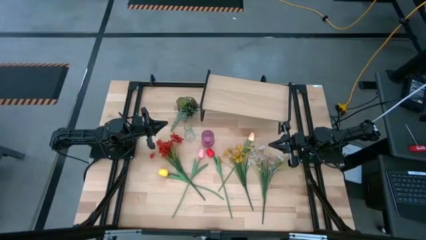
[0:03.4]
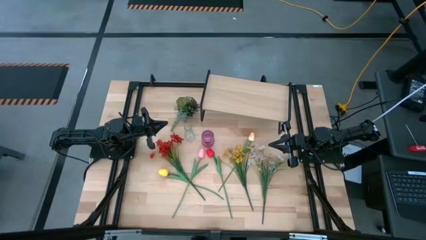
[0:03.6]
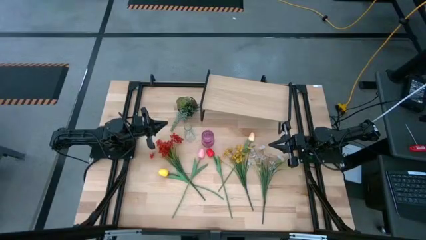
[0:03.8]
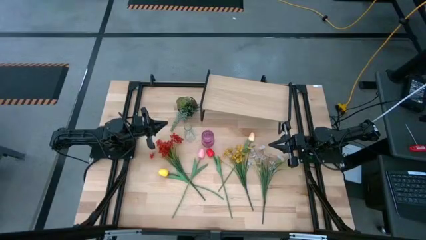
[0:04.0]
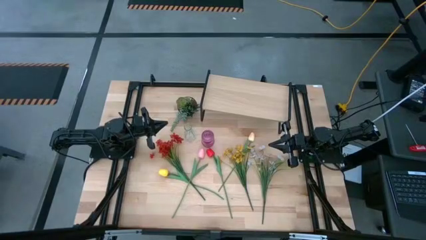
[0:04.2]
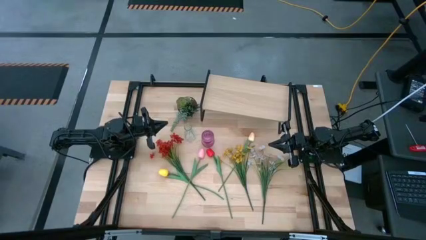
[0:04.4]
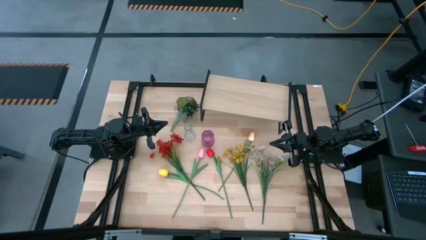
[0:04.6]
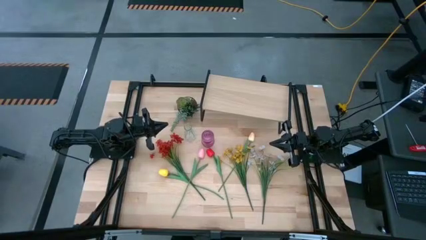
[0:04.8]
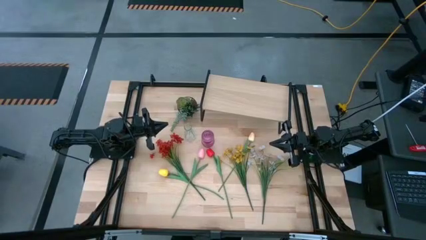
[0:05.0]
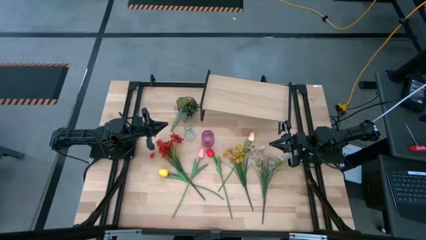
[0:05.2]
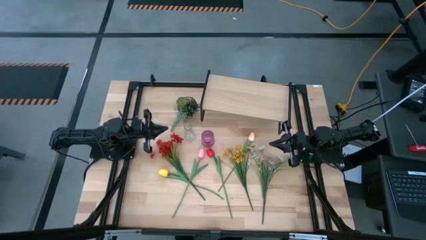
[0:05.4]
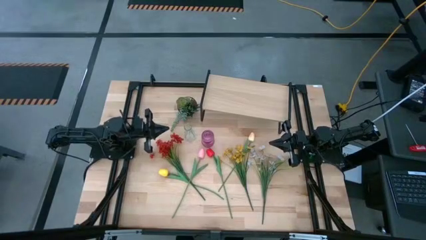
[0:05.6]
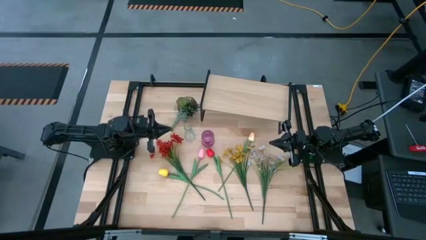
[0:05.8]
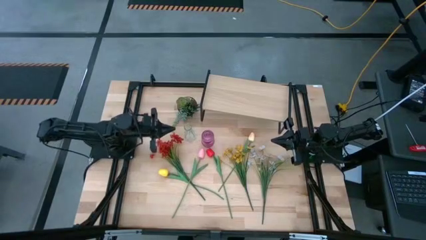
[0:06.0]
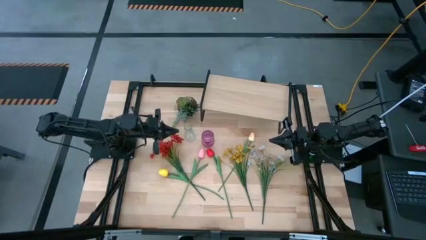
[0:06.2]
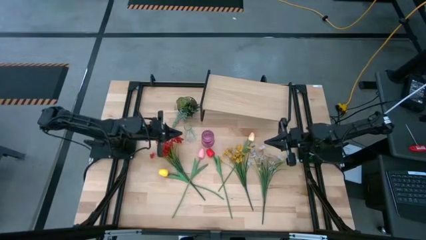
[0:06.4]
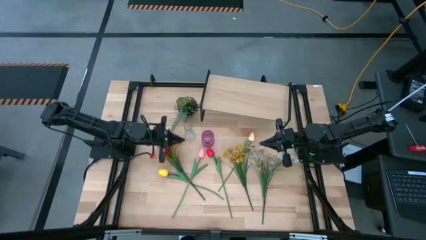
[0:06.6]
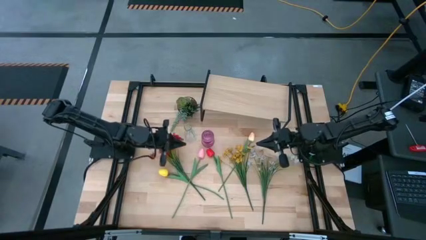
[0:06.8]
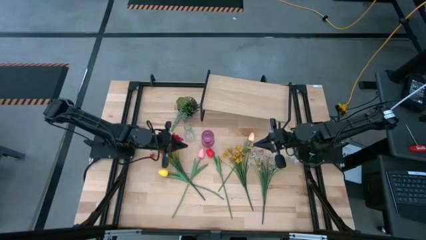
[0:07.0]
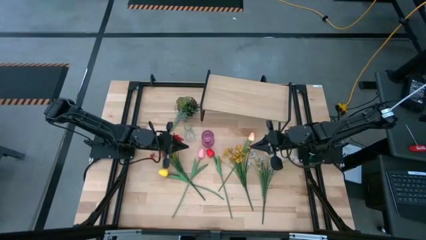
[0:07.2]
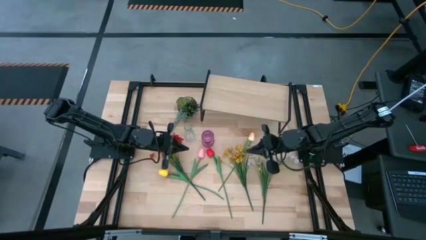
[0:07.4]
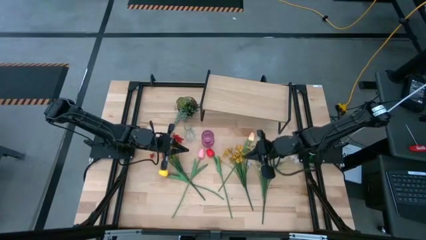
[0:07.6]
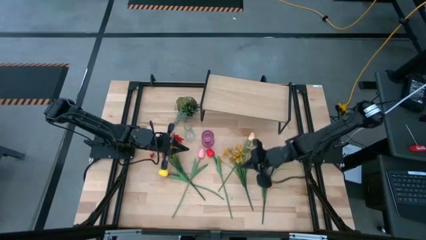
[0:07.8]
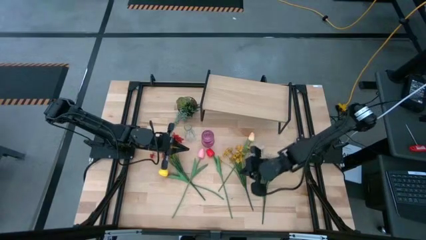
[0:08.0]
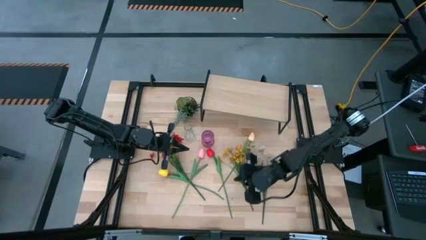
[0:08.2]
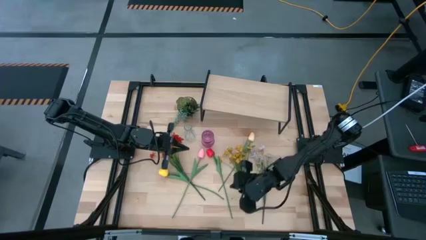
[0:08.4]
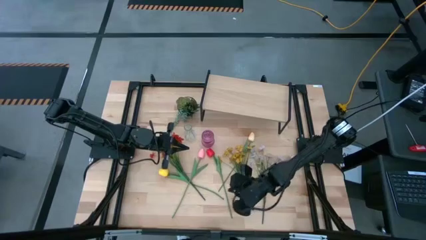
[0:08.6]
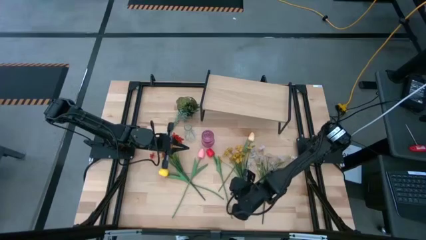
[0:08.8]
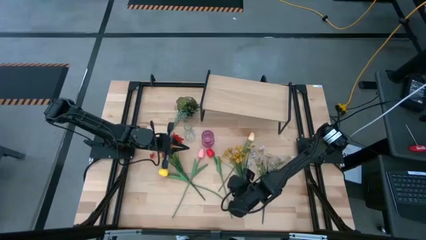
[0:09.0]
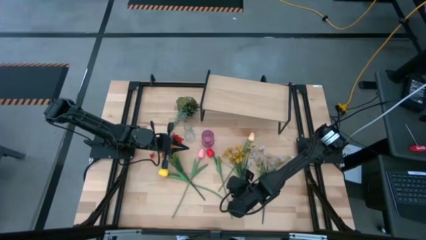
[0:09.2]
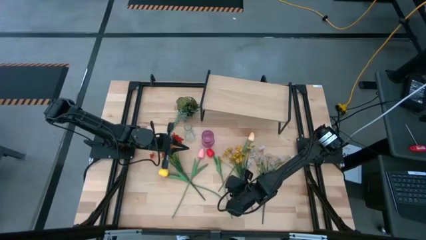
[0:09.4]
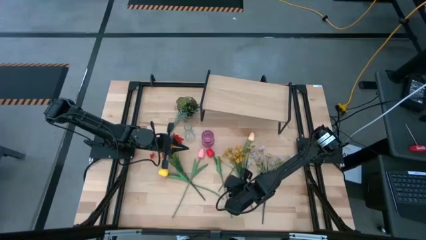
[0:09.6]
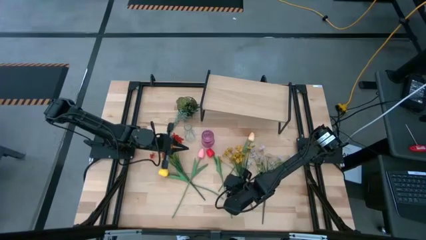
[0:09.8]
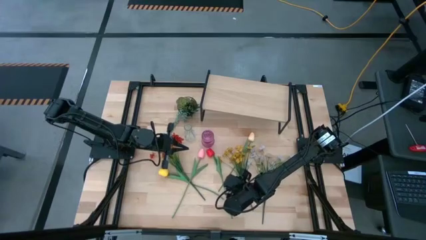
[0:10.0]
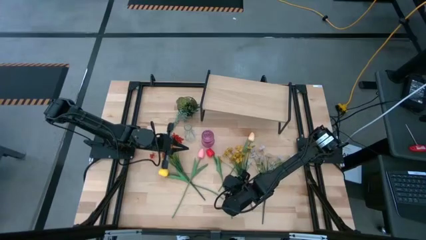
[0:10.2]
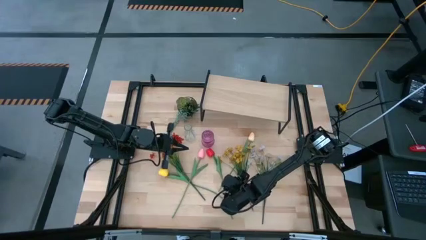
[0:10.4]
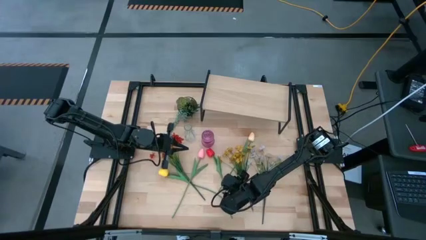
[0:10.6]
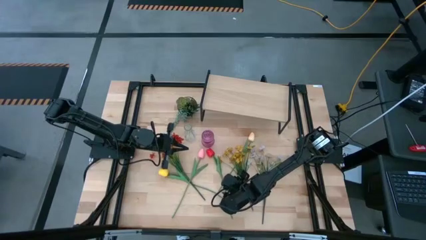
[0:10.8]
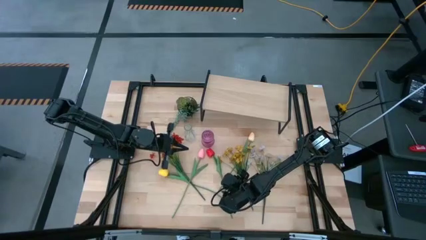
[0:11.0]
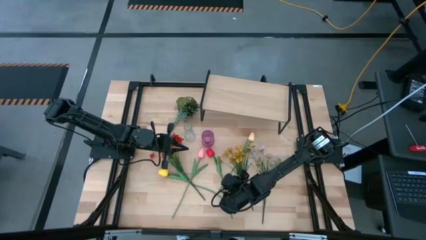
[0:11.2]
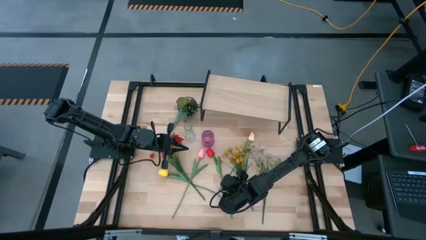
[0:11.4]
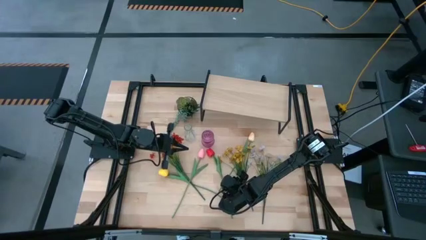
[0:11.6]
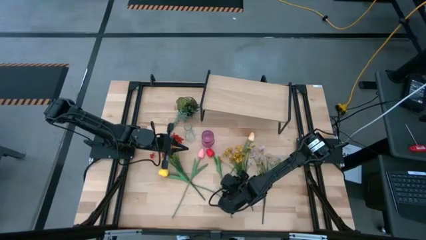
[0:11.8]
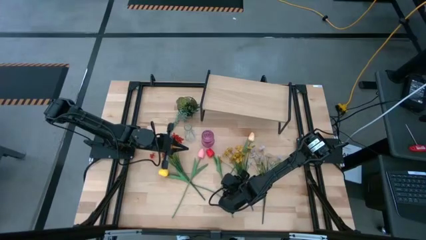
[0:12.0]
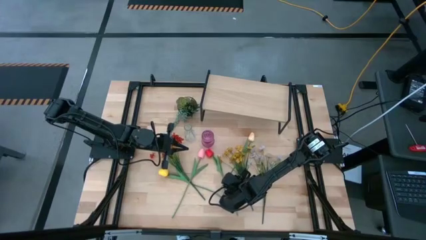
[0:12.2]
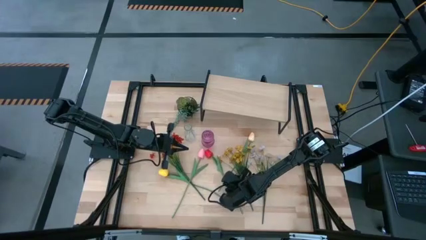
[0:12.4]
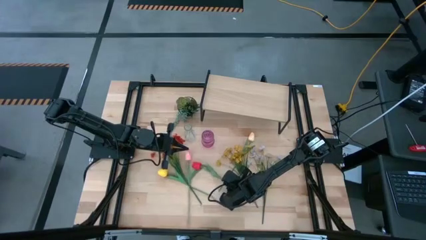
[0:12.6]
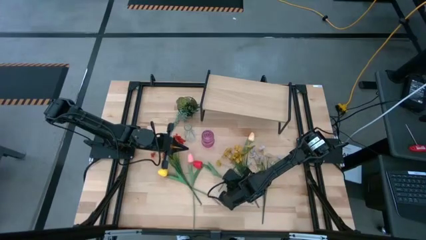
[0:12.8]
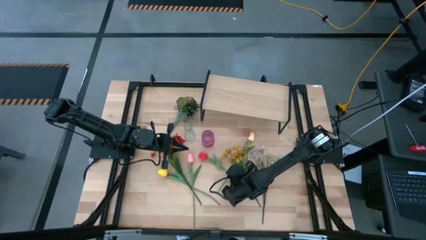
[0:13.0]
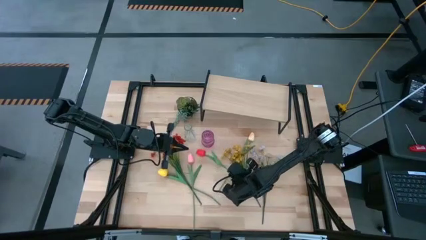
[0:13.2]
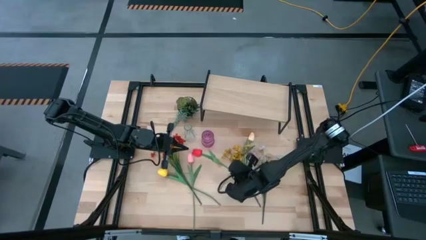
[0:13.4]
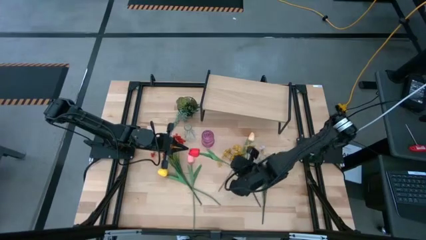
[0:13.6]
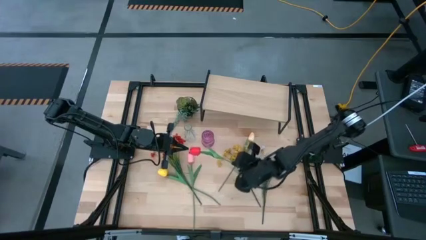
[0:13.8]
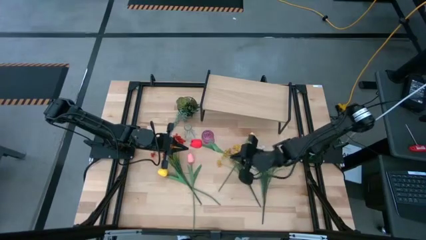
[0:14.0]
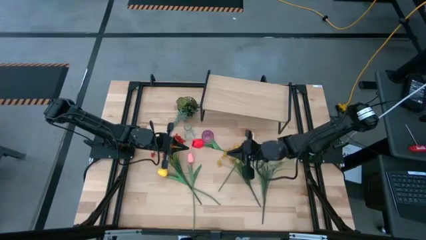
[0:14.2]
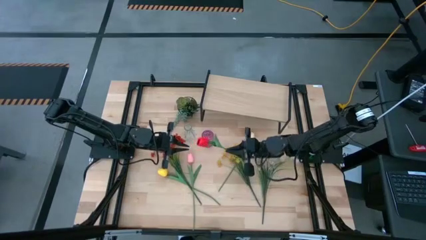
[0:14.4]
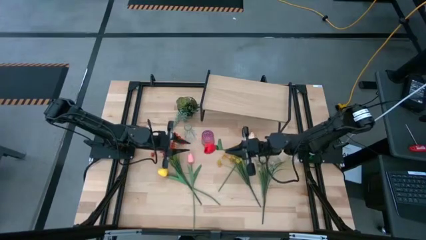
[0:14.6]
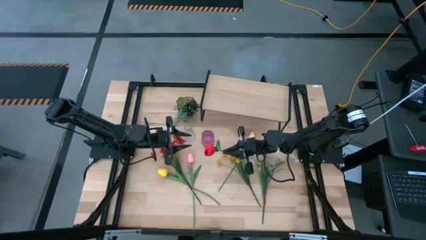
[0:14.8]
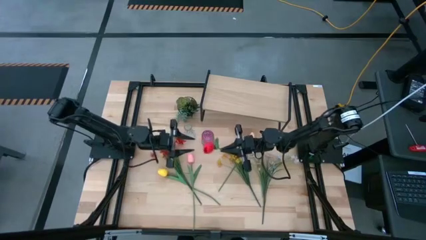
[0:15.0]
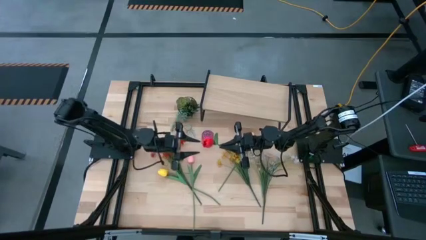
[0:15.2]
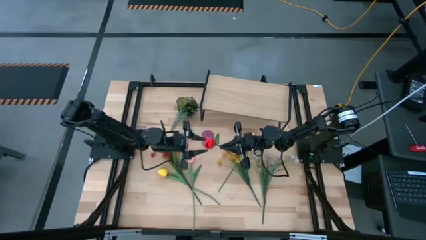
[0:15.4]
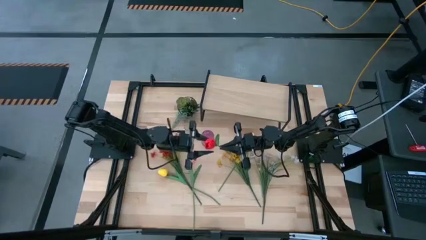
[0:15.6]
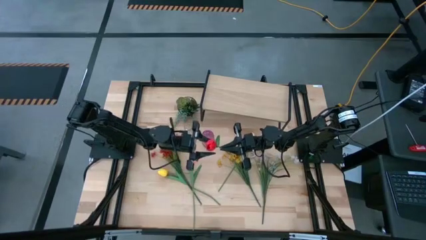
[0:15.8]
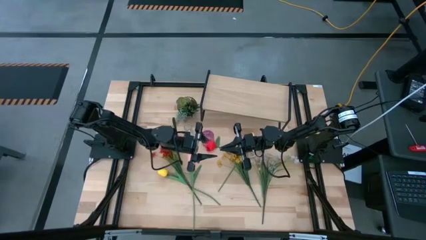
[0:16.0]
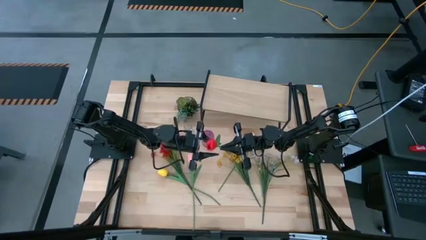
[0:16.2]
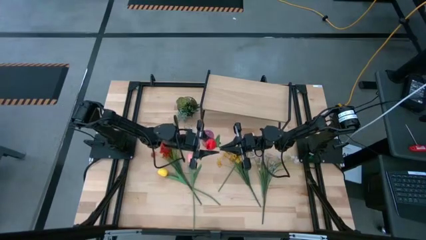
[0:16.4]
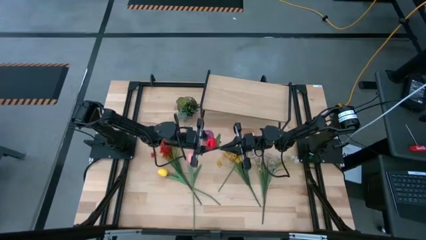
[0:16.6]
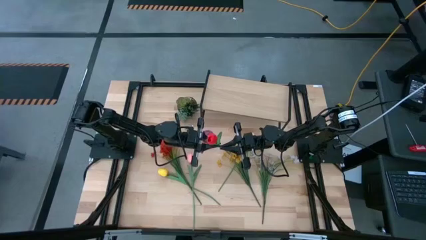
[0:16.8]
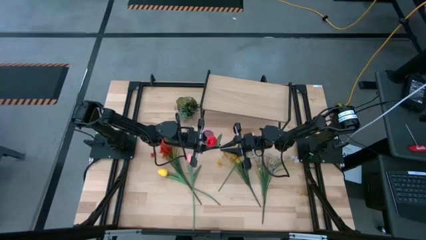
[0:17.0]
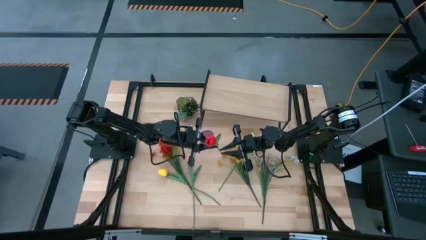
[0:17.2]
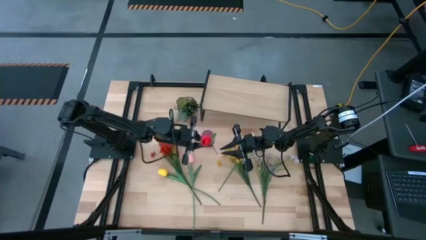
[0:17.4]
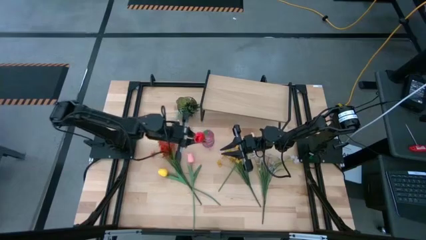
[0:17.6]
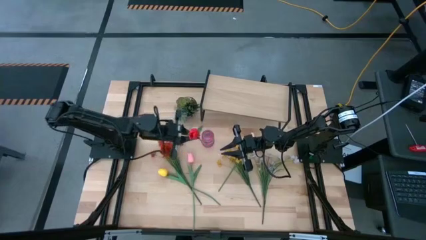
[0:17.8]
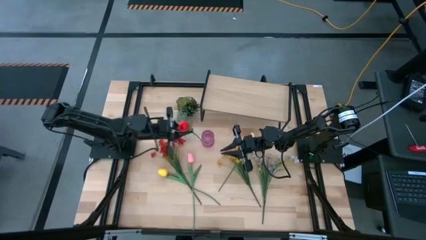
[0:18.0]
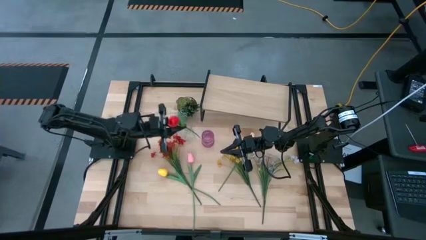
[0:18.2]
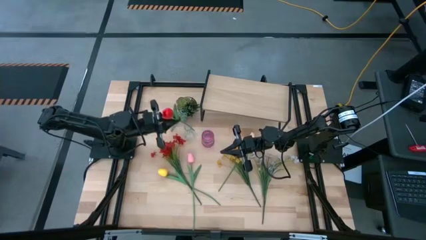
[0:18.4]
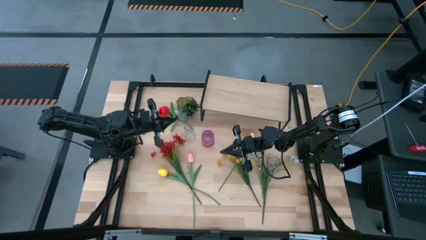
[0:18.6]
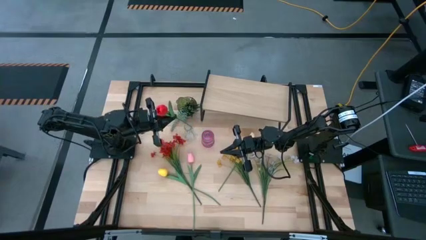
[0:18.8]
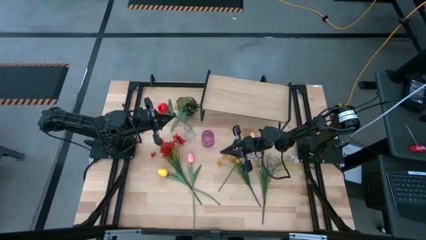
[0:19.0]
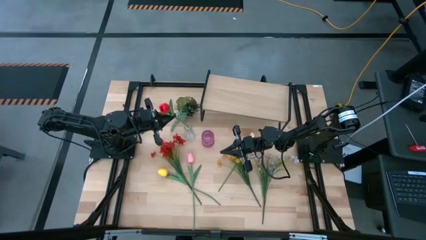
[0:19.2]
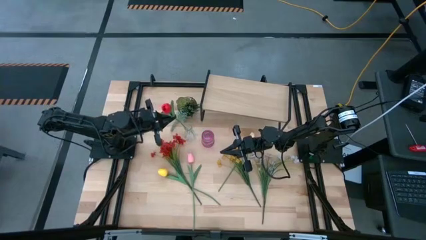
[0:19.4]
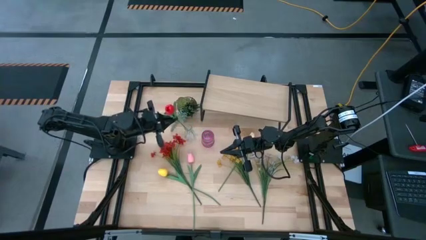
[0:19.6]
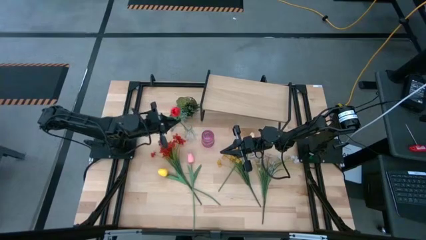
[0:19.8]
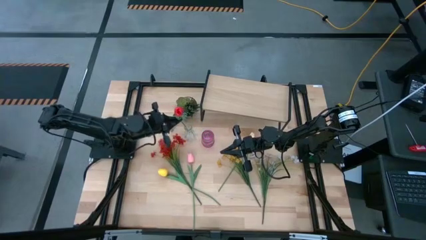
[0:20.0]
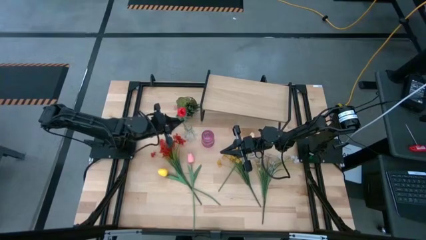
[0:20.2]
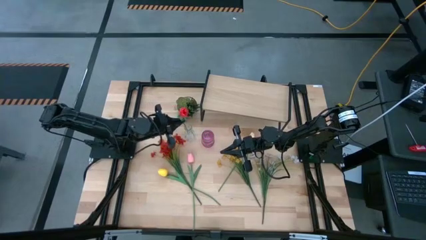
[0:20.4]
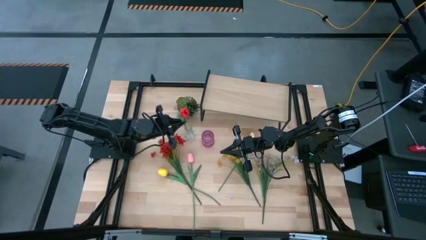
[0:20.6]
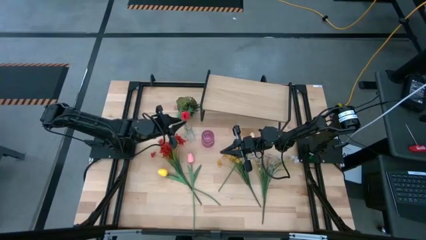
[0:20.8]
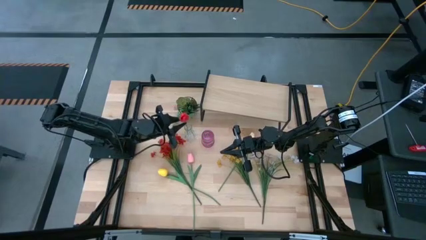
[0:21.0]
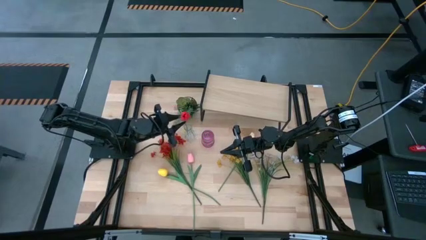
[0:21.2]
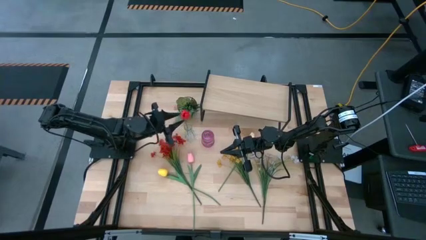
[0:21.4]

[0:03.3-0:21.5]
Task: Pick and place flowers into a vace then onto a shelf
Put the red flower into the transparent vase
